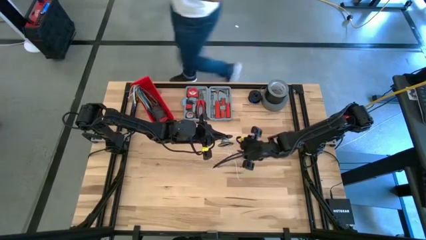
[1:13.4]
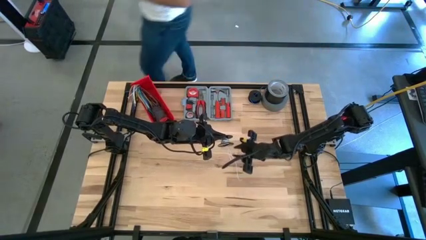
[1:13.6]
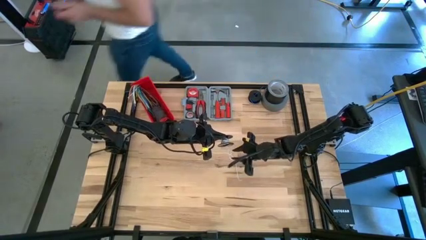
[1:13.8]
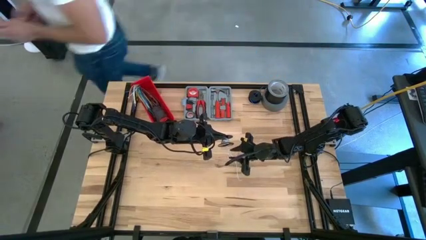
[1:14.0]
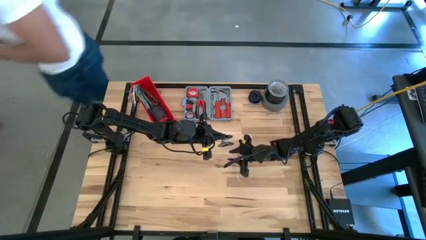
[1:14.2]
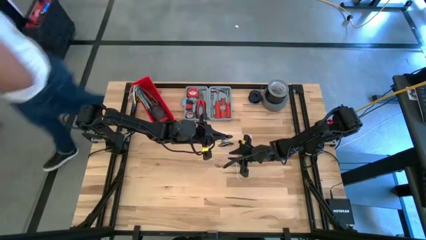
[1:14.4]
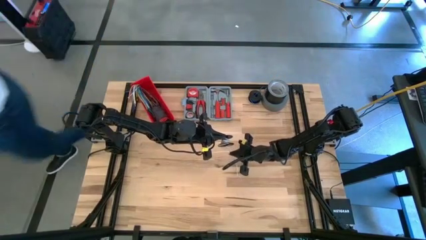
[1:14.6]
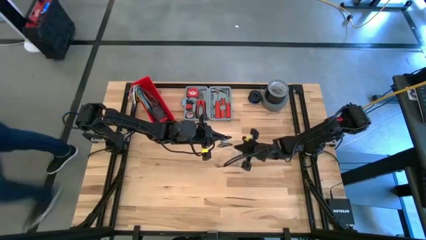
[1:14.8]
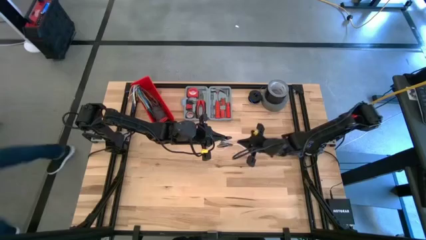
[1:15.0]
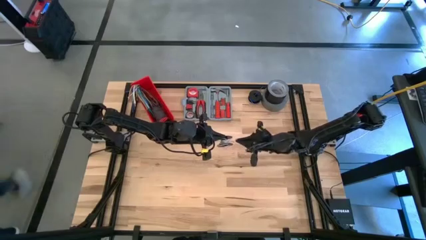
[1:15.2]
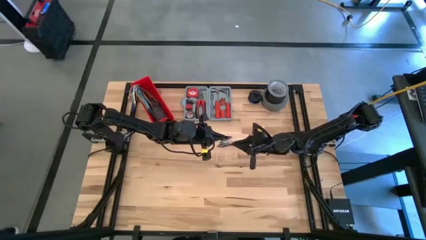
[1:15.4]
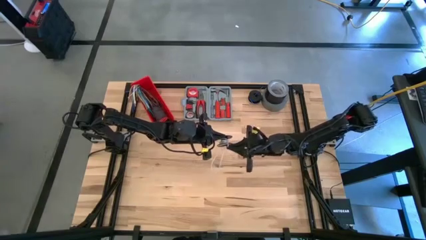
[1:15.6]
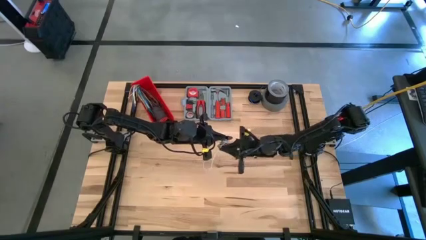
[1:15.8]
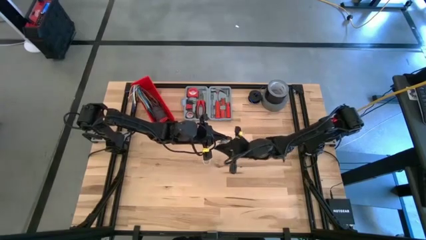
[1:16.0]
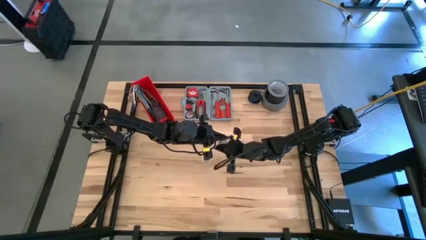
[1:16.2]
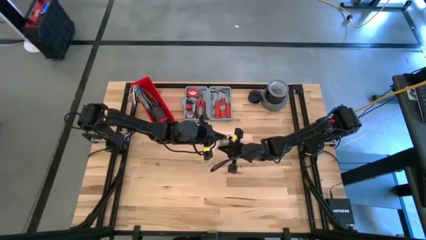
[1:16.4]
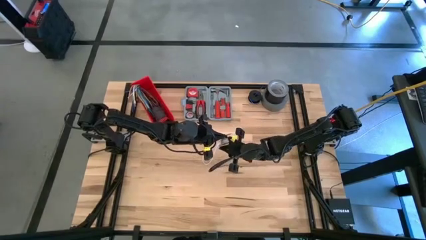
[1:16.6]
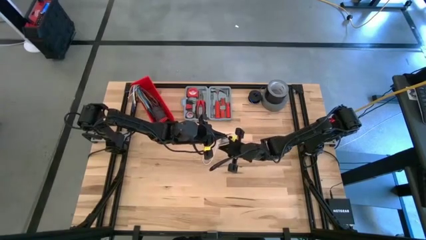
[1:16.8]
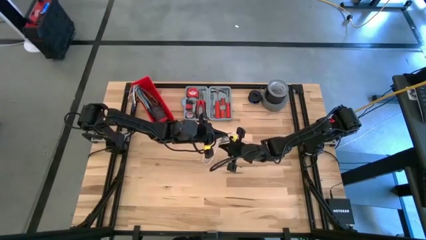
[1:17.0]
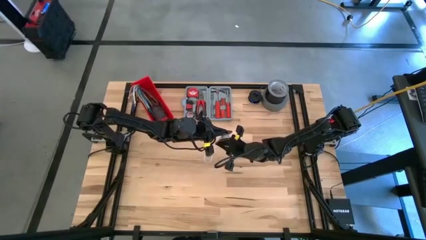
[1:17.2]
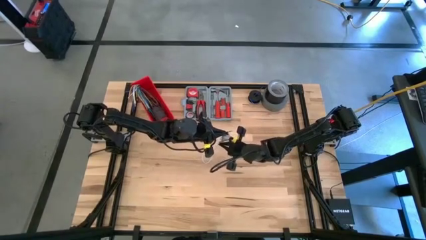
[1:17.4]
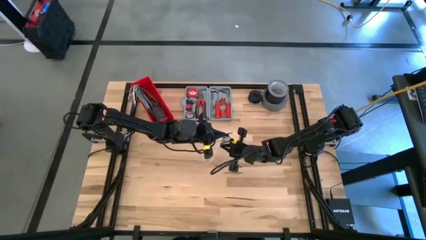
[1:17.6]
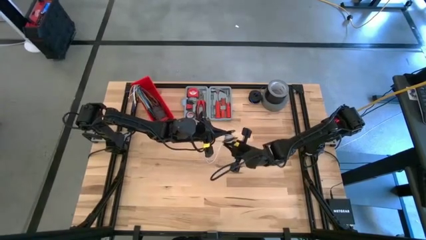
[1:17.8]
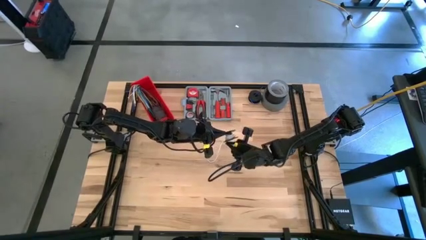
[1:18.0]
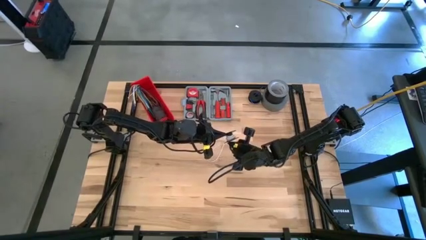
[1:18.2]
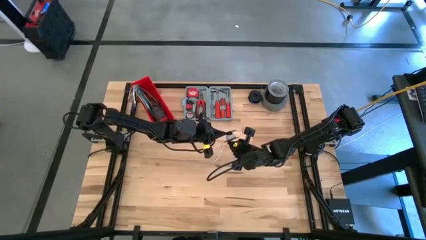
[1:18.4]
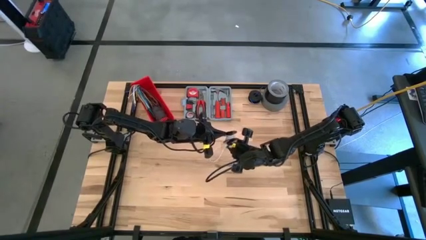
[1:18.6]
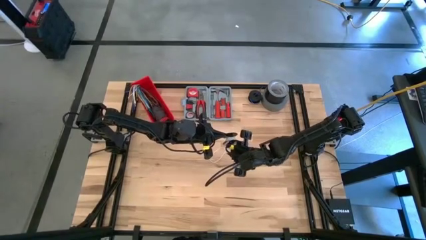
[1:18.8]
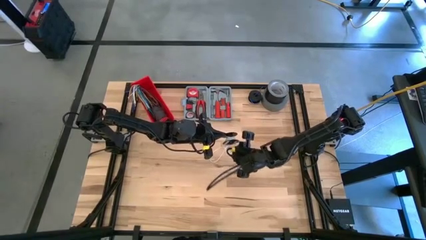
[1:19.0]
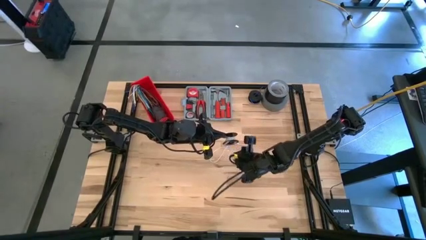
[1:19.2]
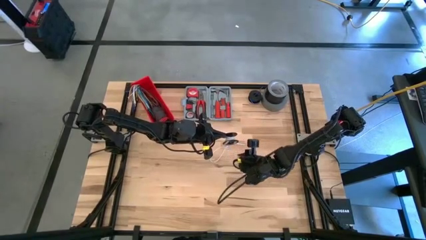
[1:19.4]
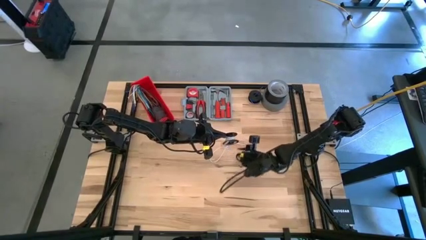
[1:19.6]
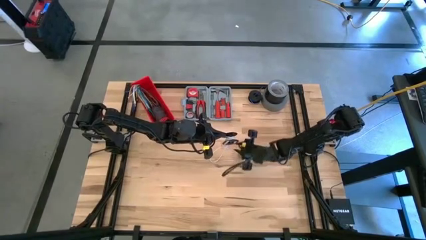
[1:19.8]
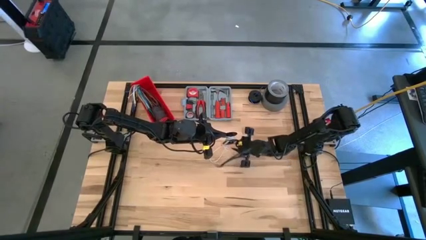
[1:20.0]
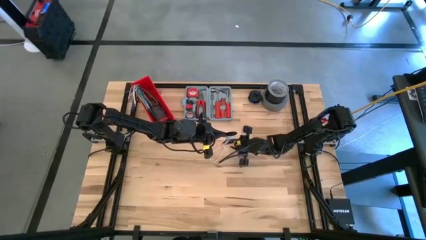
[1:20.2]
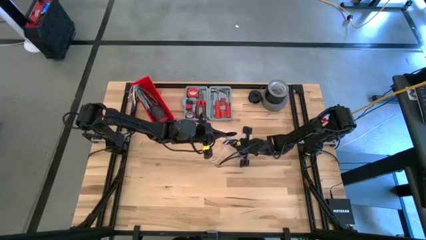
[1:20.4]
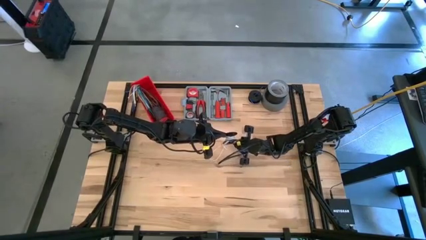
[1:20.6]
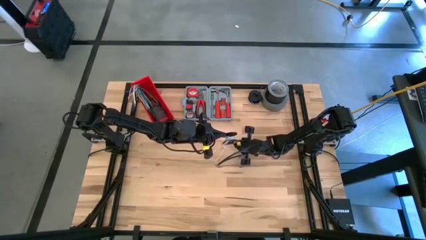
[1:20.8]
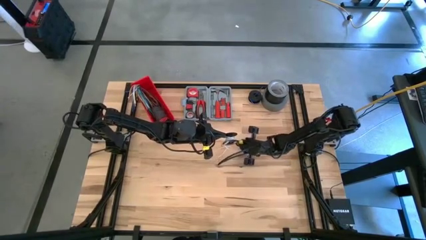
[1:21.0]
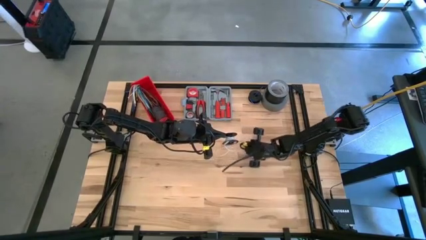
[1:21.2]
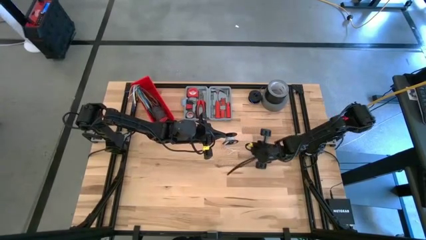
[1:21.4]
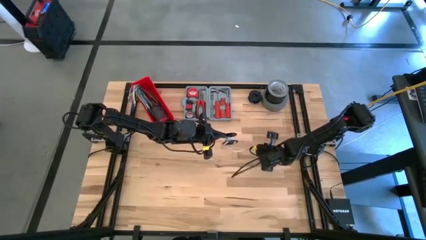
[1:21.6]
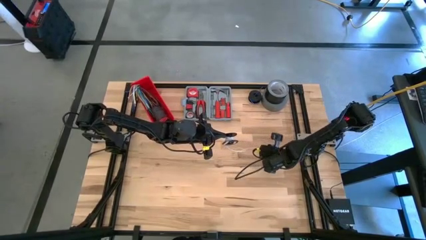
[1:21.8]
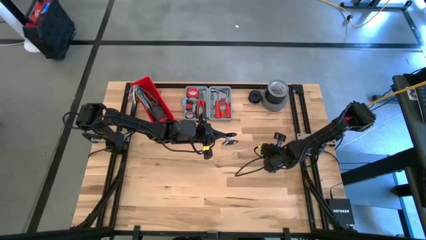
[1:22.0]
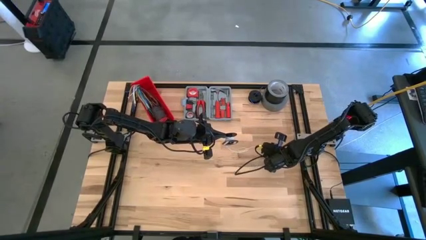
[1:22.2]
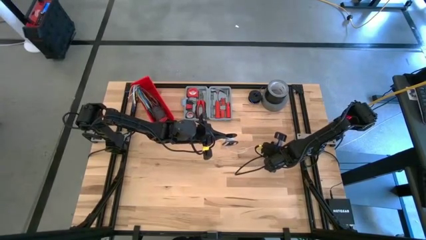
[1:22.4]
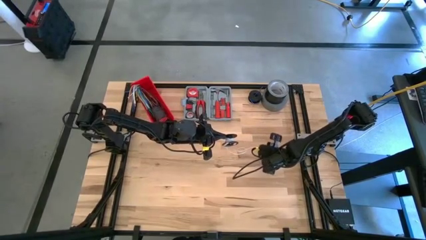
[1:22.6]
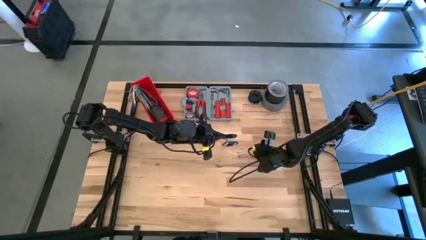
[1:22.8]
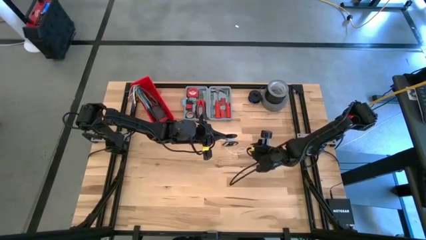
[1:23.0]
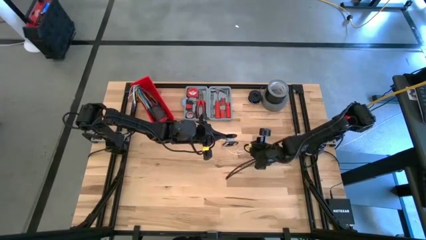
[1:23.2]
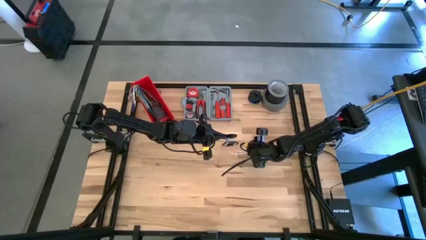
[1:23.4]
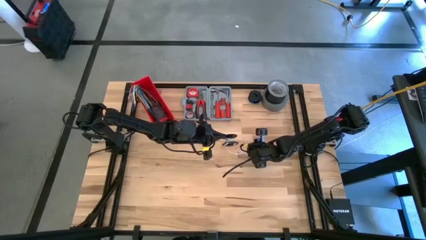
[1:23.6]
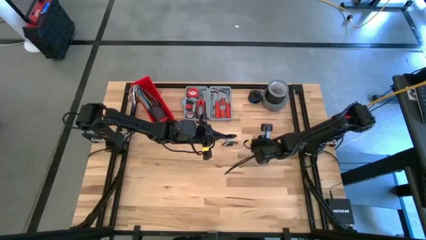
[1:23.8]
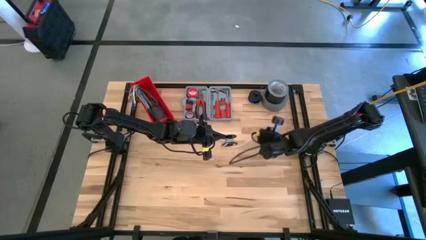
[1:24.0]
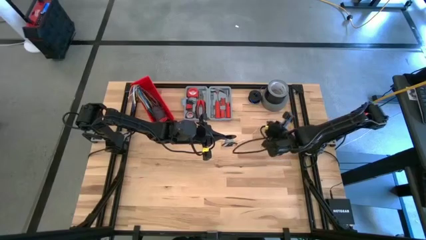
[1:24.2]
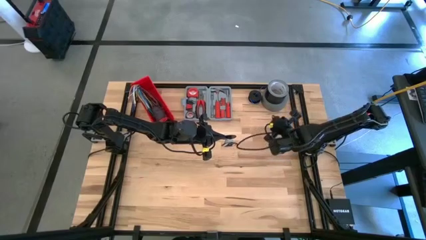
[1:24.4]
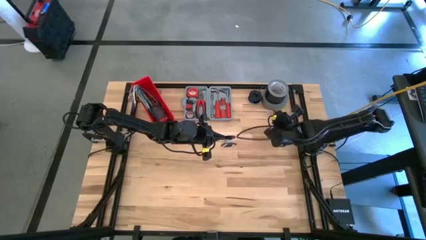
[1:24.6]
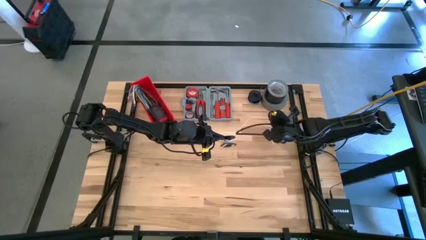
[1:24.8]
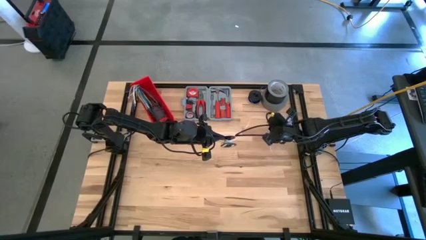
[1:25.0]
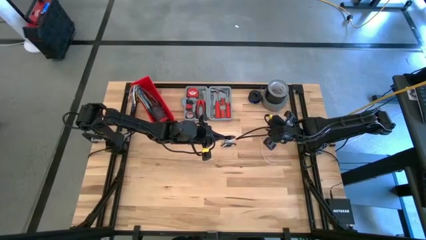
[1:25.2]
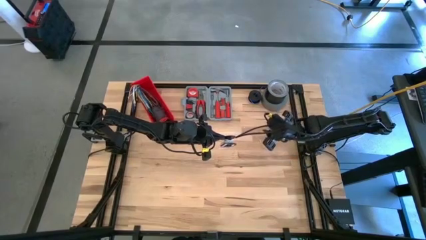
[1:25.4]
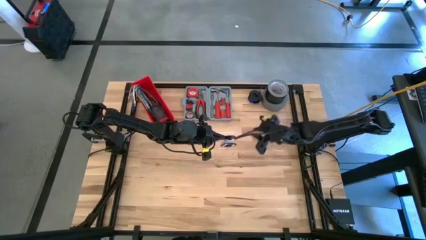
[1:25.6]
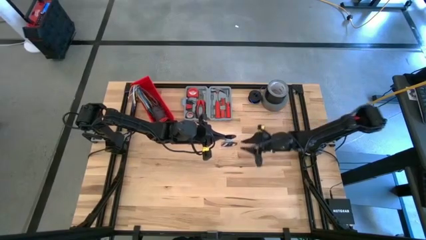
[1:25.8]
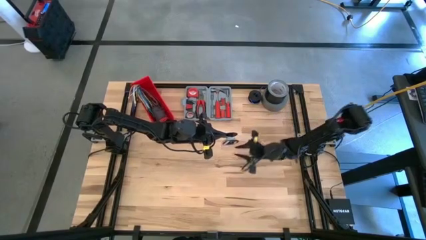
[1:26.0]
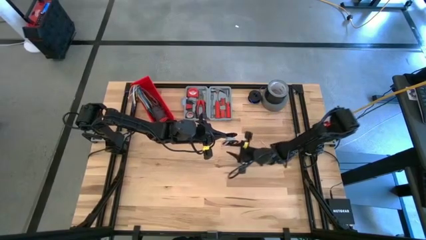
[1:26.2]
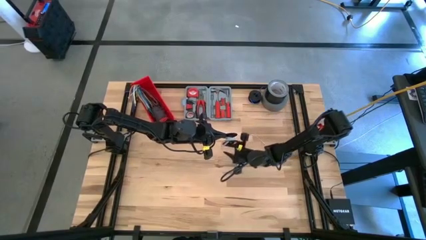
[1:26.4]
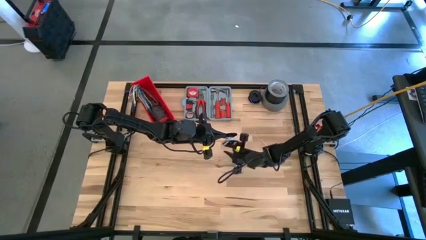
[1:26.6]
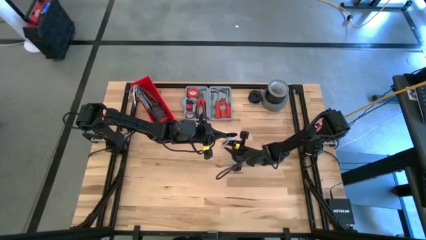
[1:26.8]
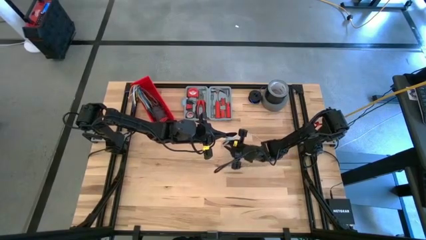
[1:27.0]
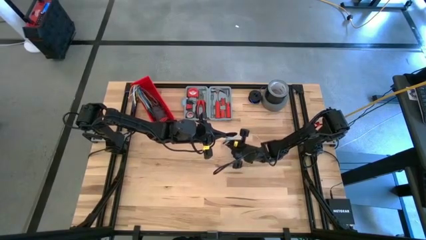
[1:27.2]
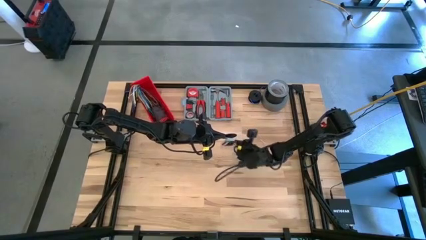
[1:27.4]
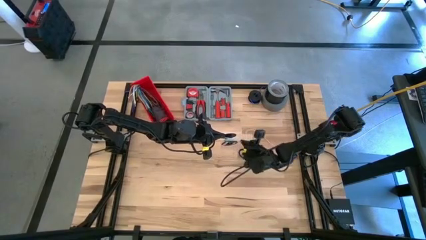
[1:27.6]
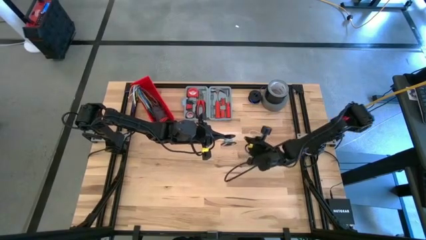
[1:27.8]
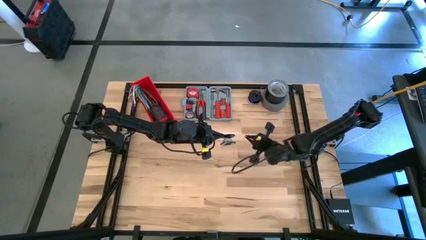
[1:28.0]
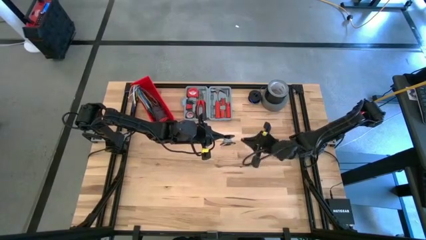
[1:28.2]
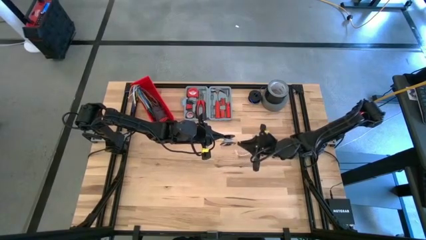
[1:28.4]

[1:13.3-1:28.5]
Task: Coil cords
Coil the white wire into the spool
